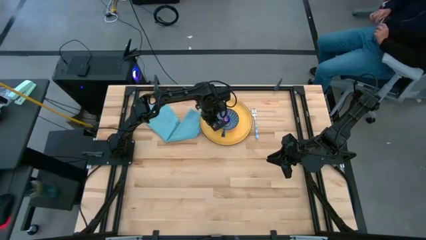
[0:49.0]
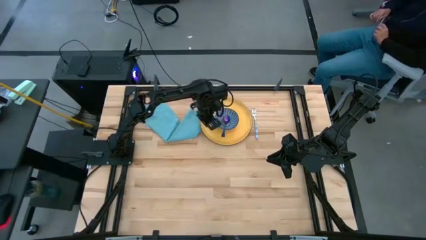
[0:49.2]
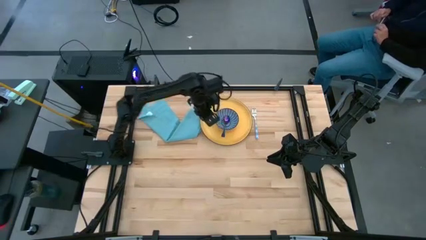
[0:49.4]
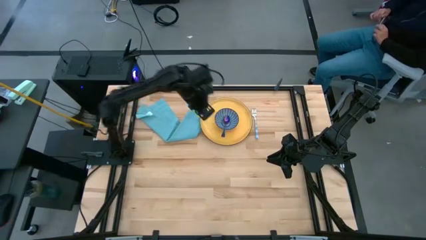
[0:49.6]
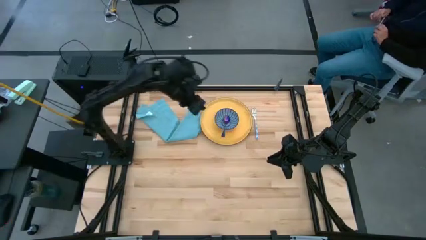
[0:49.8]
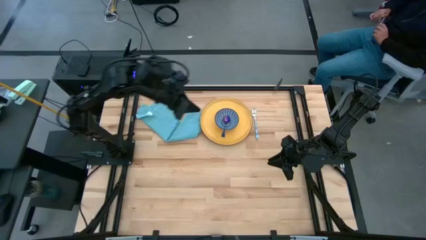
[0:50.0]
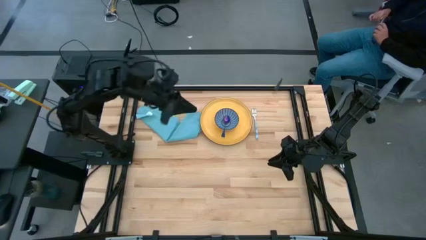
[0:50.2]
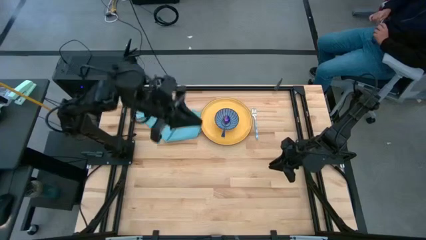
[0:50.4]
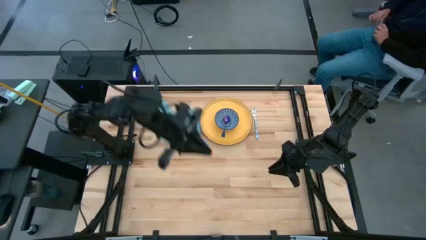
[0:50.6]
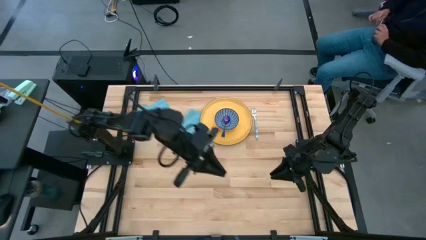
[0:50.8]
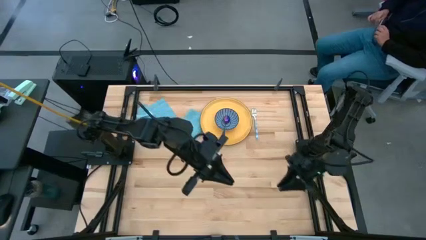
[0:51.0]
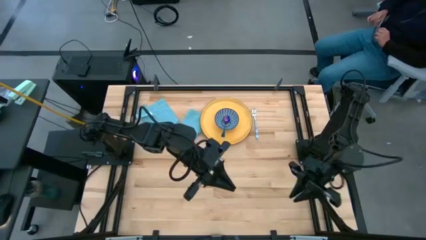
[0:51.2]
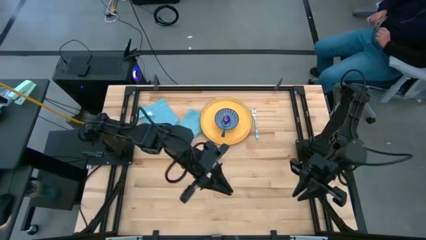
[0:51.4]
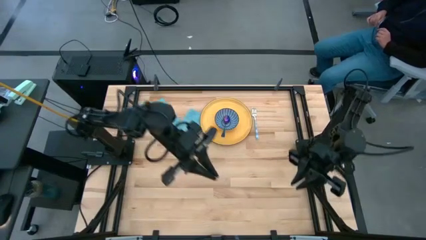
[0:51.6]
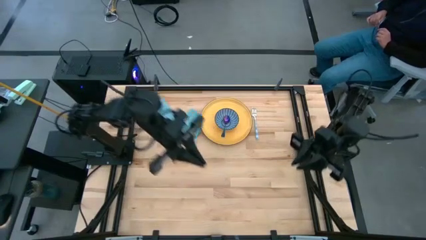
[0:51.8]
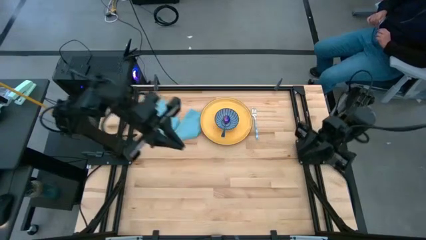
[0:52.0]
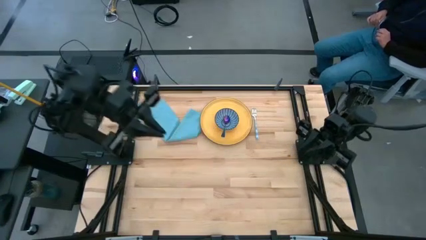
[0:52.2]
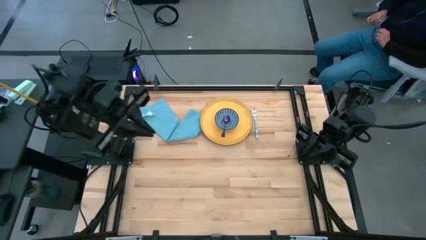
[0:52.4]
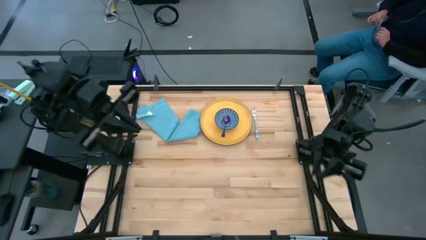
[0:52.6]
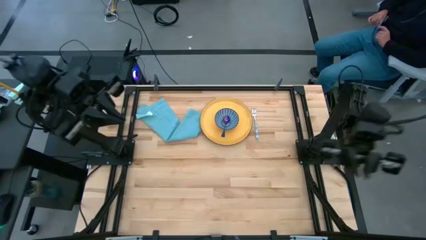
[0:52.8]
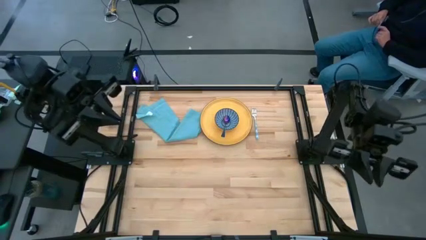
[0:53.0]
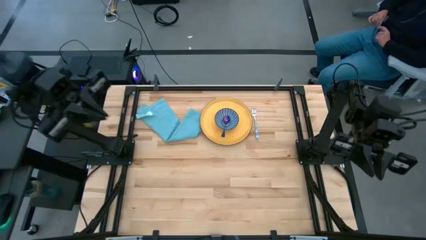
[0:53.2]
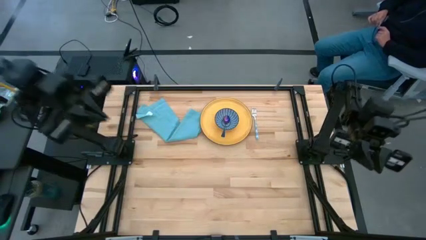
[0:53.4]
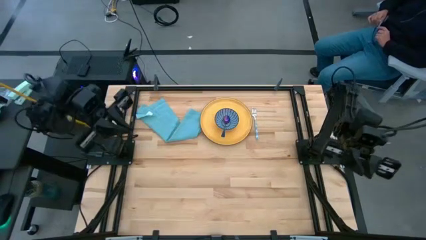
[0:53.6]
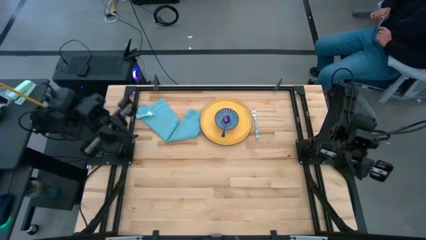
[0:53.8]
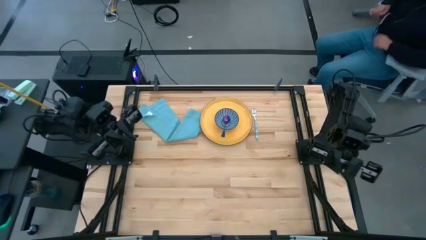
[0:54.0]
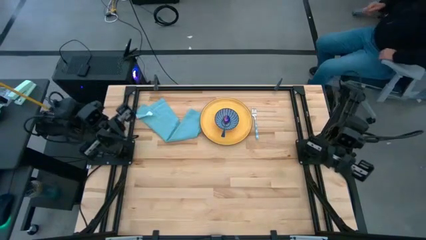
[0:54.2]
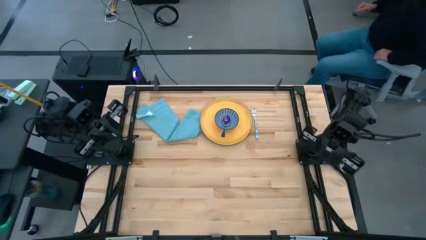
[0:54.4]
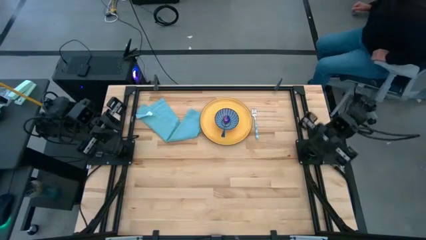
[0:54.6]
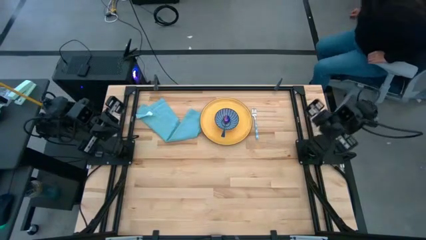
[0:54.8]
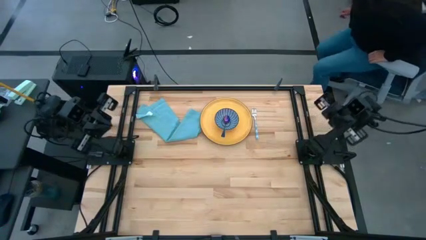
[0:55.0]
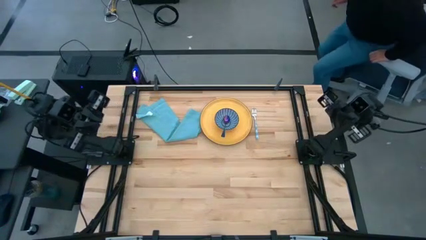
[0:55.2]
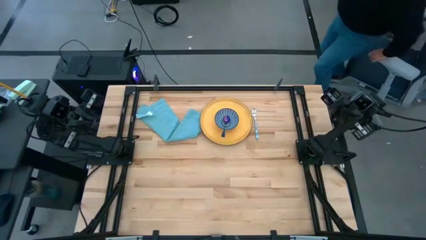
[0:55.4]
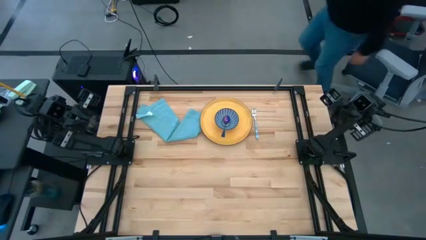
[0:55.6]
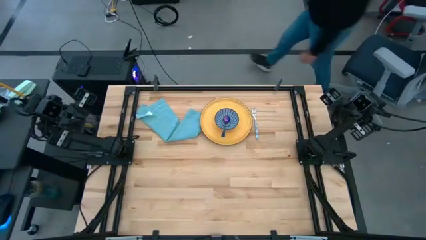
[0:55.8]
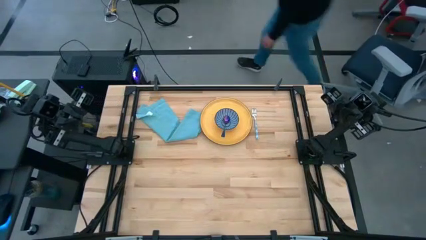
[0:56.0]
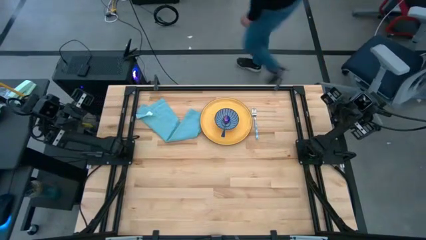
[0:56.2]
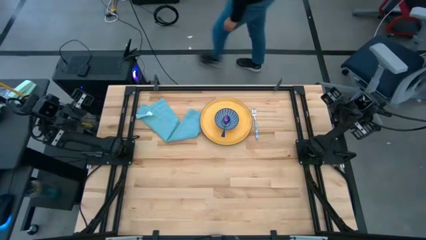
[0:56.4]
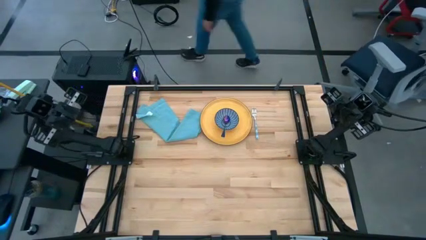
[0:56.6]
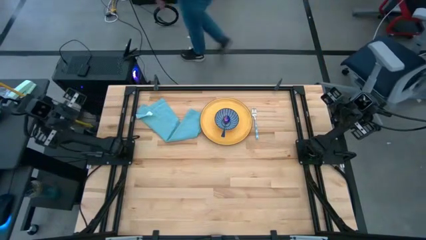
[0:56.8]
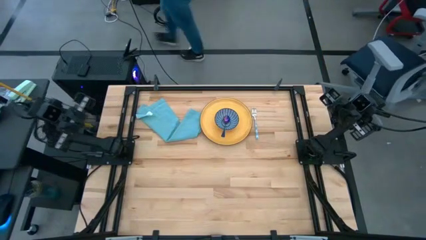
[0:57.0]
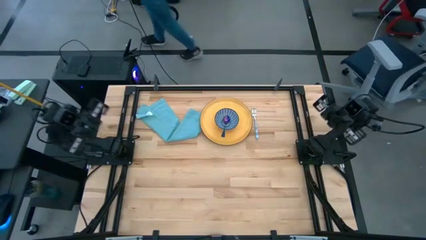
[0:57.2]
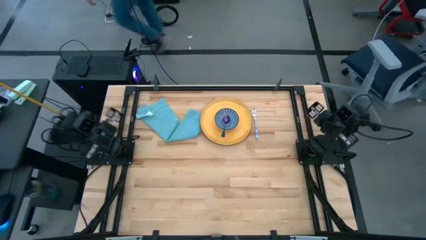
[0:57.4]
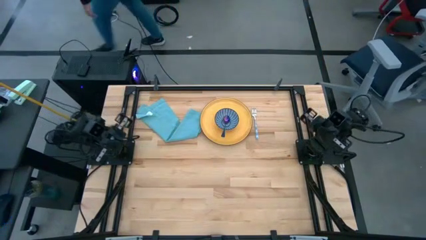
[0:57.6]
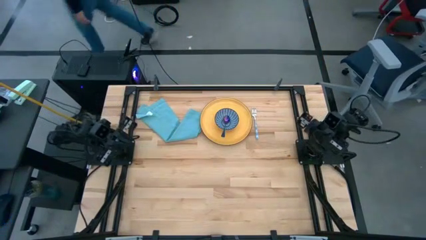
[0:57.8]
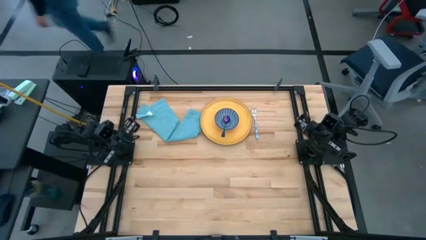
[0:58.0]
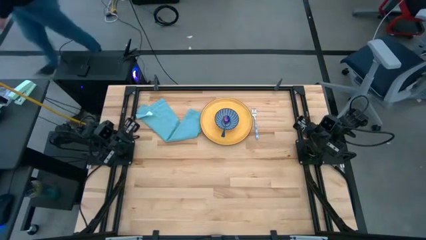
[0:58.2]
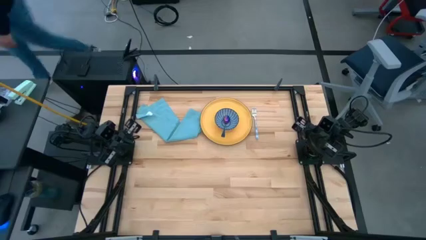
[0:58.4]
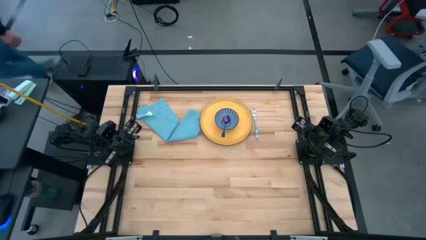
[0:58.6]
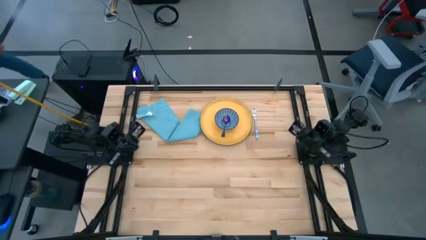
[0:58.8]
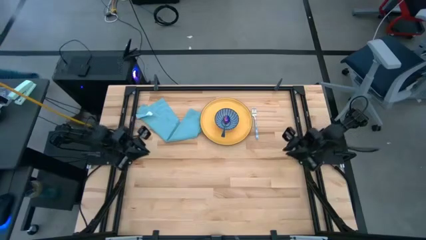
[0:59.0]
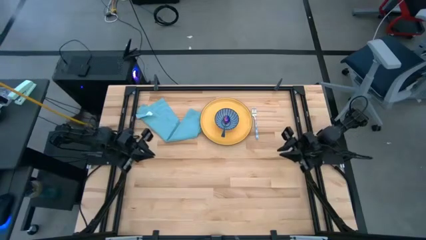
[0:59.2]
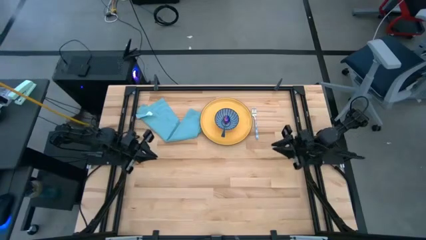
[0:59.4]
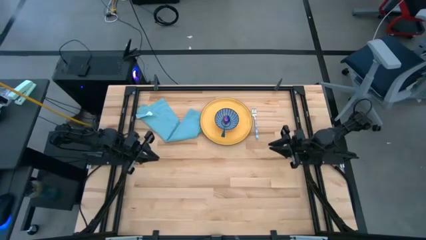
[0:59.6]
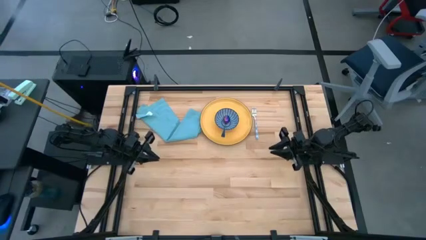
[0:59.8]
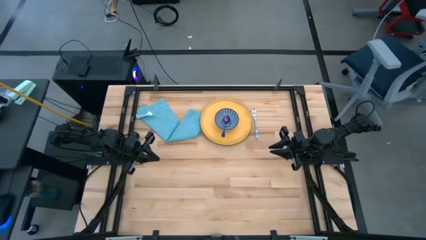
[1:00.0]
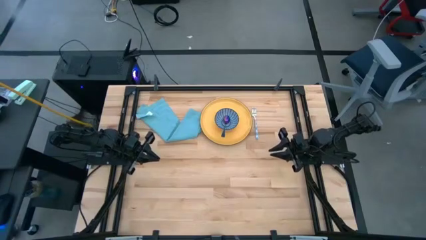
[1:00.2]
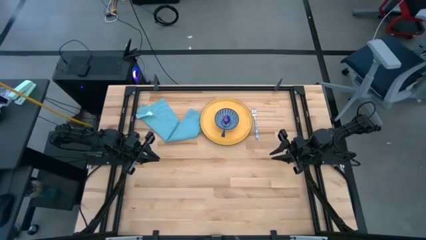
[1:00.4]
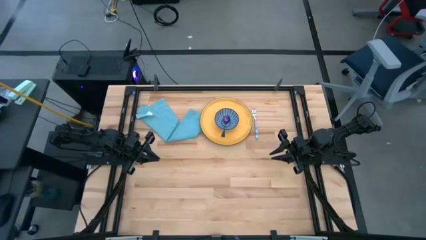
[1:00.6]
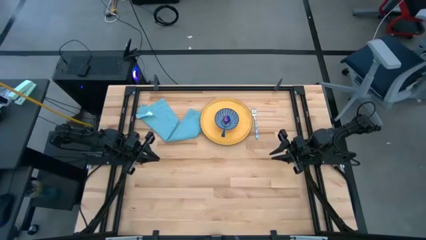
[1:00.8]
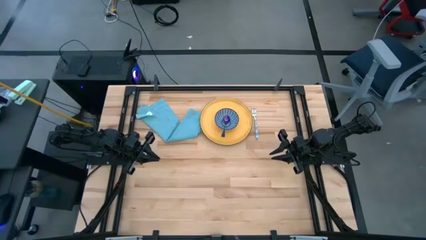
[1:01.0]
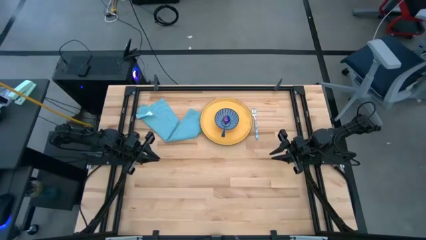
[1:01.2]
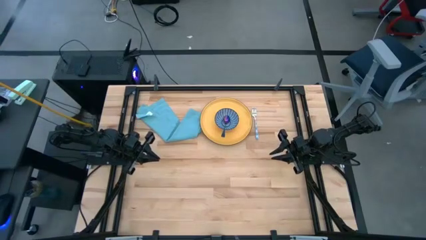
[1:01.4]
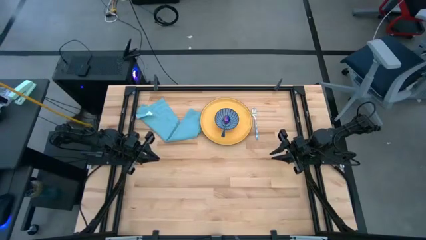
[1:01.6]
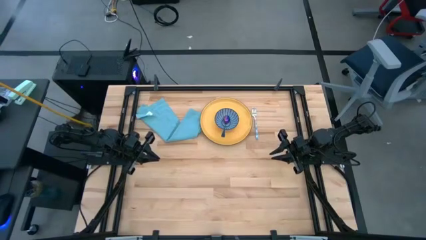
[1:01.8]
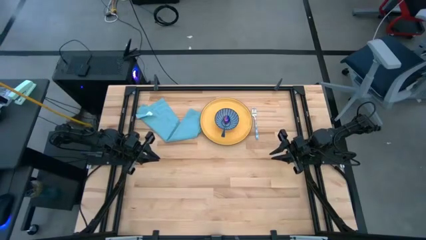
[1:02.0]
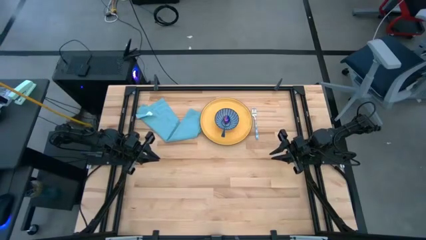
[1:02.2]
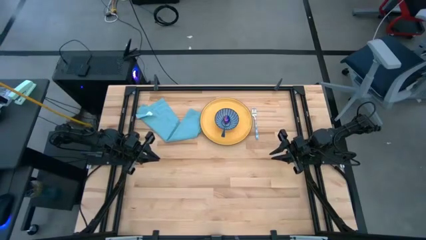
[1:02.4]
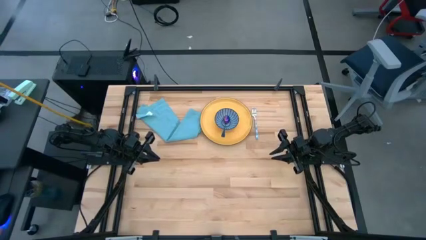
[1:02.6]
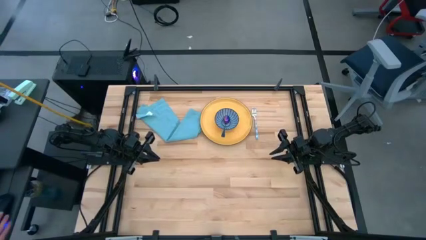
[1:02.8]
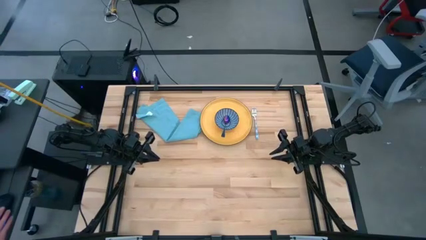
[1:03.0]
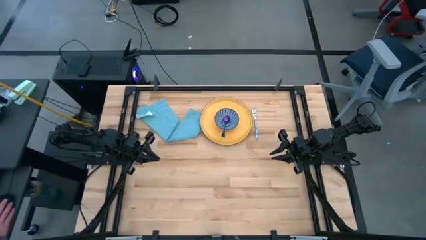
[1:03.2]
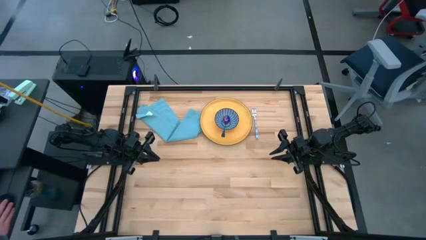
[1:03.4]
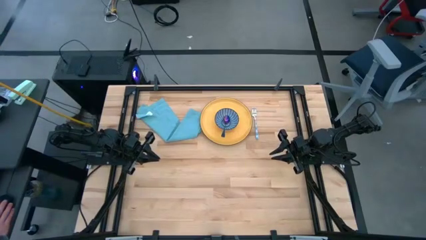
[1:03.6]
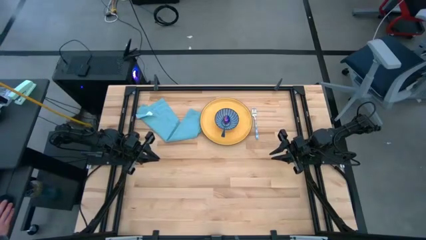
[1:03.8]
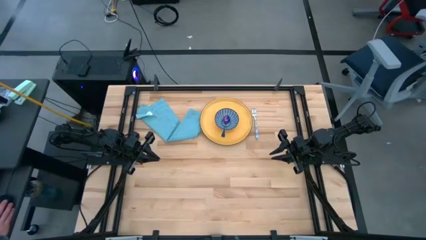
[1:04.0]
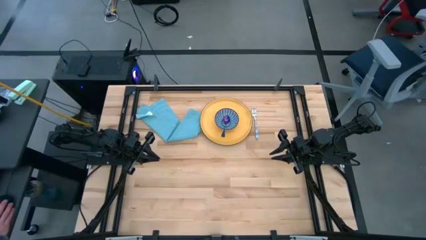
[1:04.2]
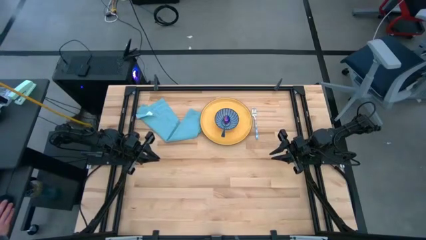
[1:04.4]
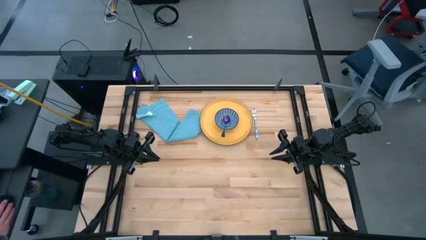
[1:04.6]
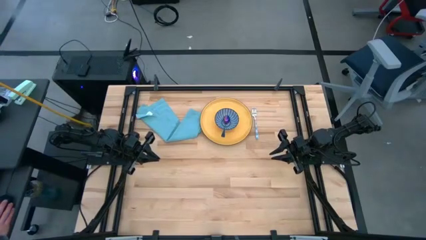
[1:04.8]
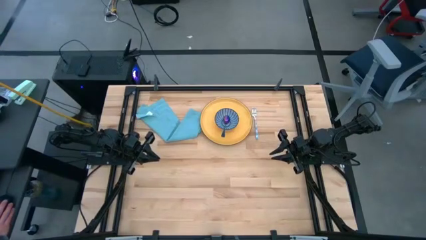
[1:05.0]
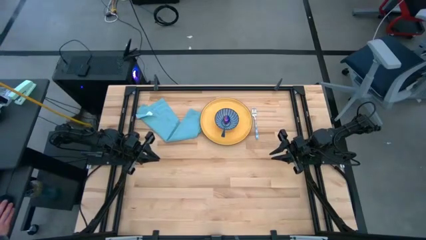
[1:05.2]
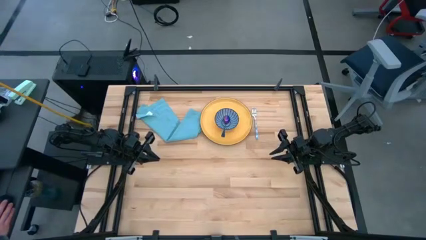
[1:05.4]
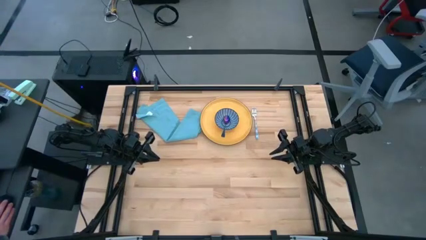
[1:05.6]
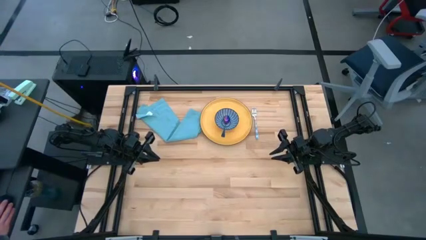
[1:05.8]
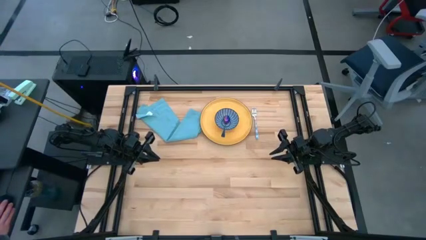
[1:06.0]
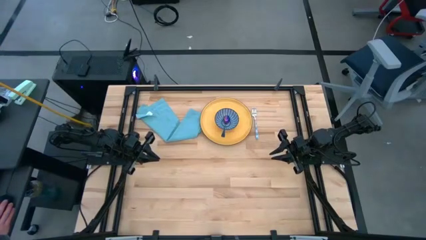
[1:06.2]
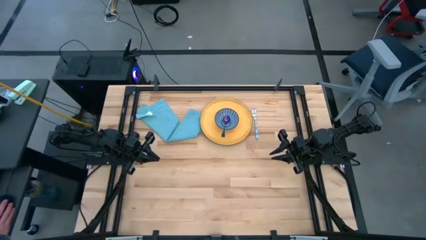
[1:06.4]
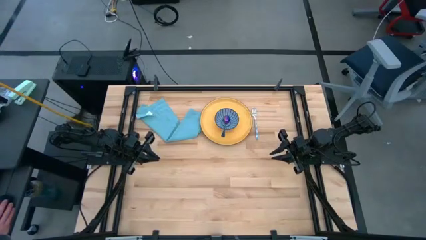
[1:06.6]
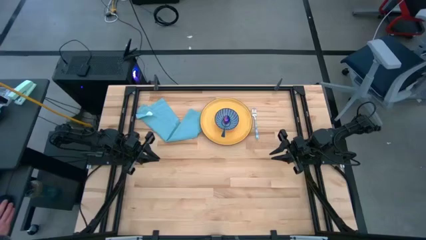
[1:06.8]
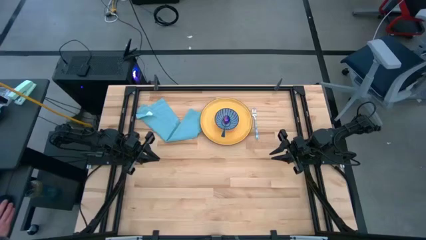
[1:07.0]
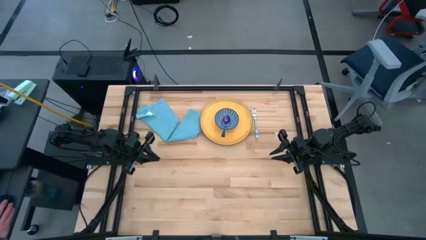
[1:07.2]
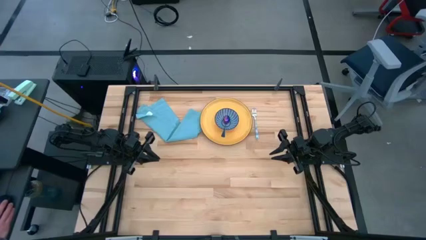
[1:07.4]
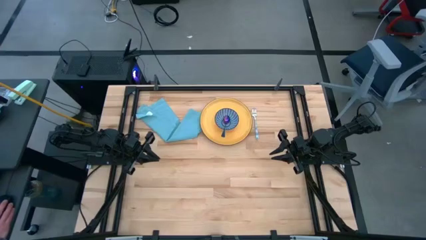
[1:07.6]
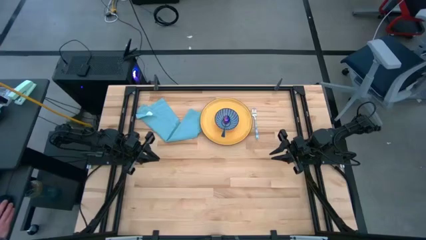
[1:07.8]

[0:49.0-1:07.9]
Task: Set table place
Return to Home Position
